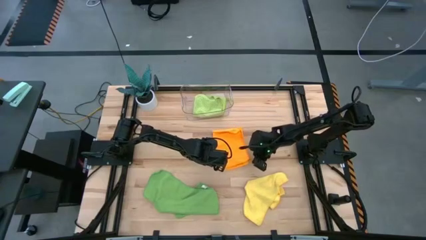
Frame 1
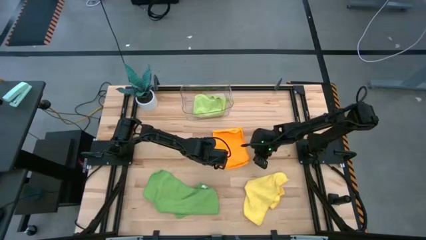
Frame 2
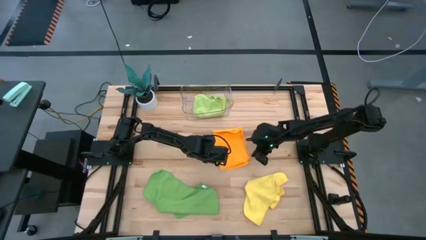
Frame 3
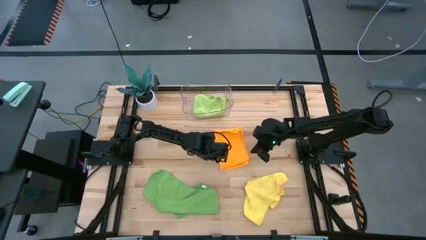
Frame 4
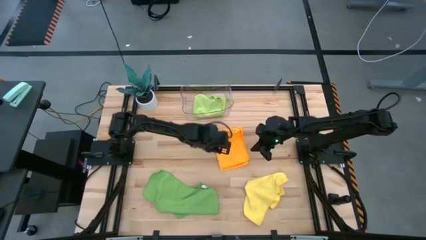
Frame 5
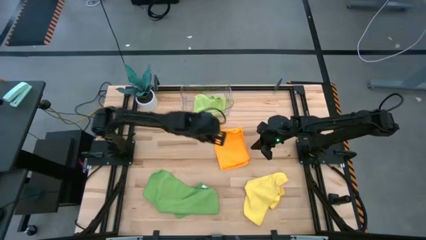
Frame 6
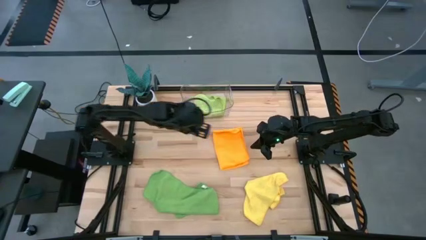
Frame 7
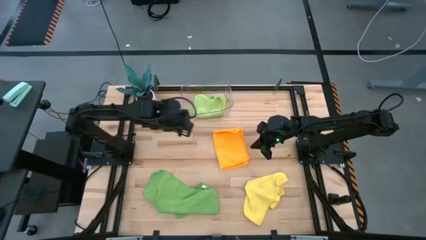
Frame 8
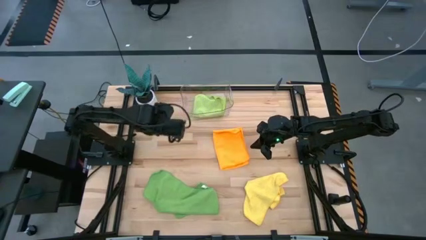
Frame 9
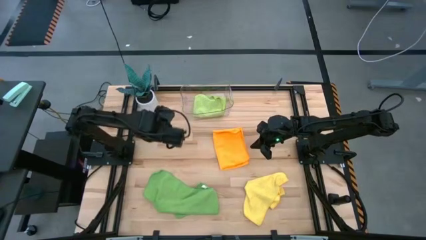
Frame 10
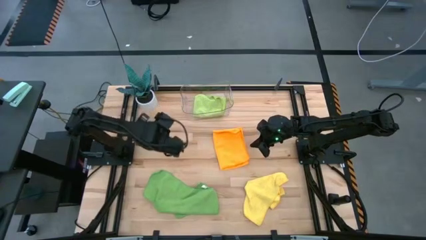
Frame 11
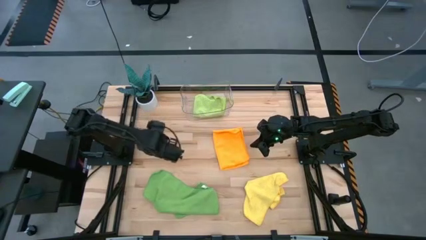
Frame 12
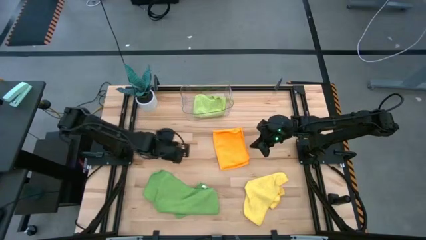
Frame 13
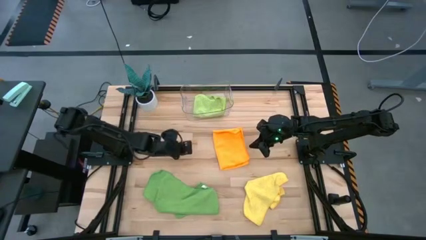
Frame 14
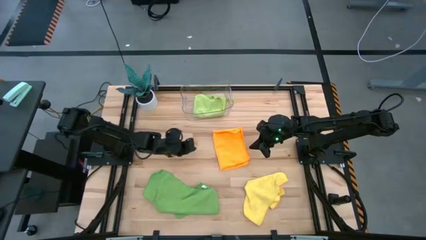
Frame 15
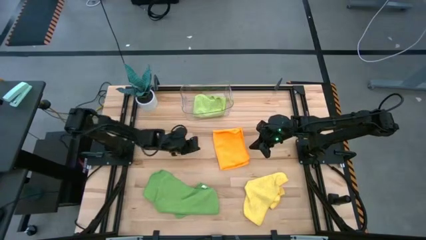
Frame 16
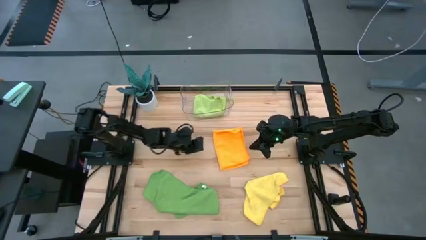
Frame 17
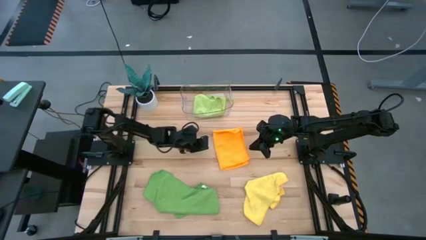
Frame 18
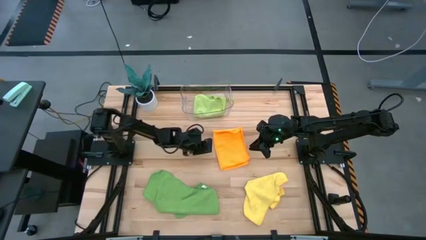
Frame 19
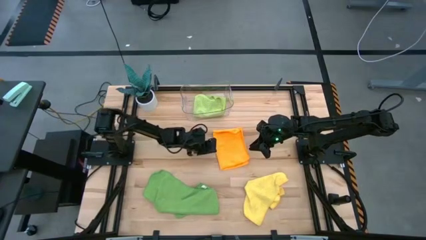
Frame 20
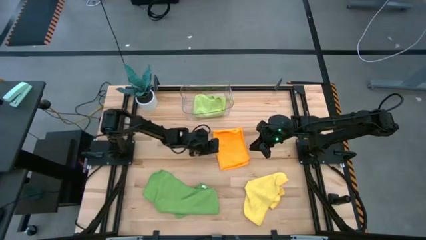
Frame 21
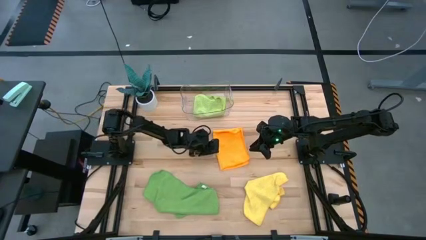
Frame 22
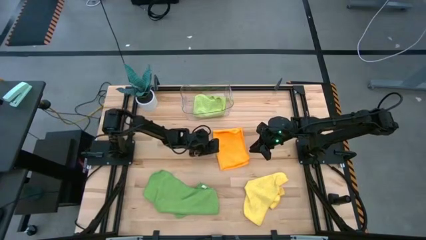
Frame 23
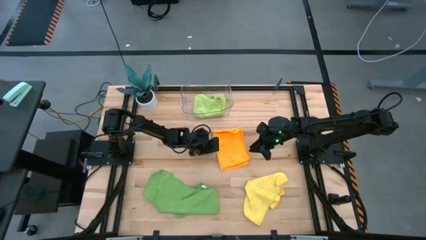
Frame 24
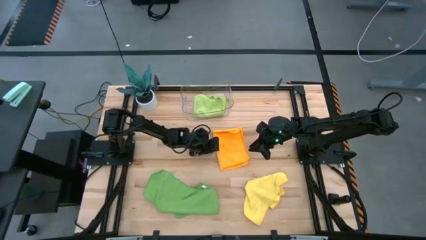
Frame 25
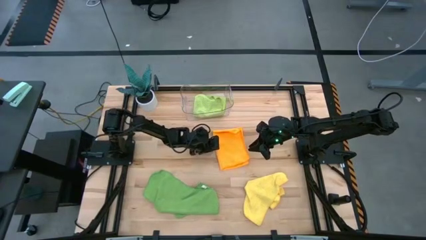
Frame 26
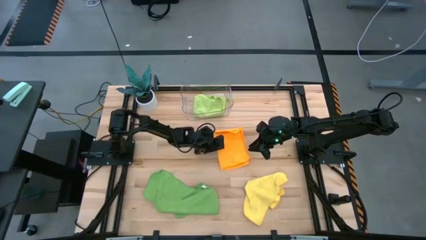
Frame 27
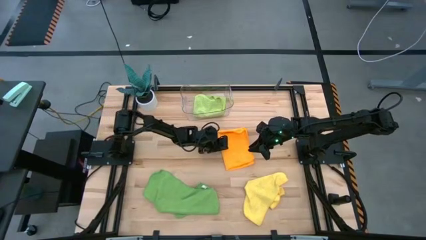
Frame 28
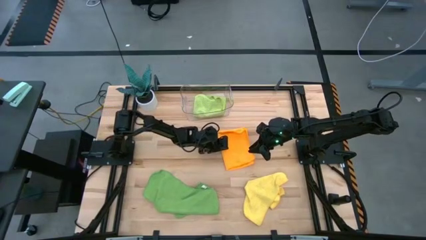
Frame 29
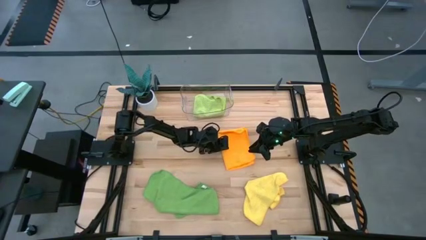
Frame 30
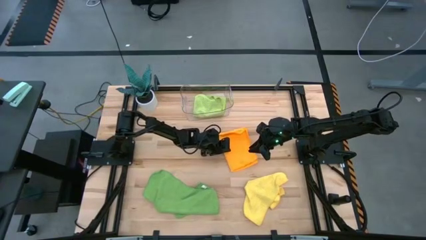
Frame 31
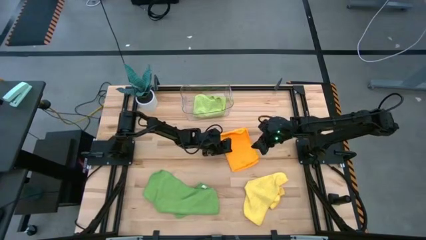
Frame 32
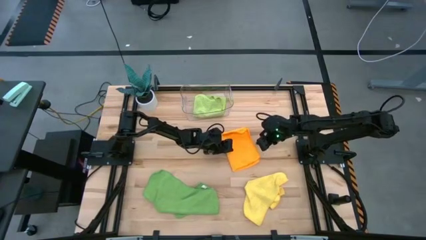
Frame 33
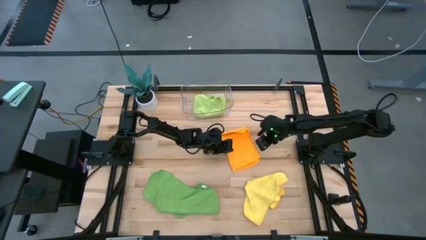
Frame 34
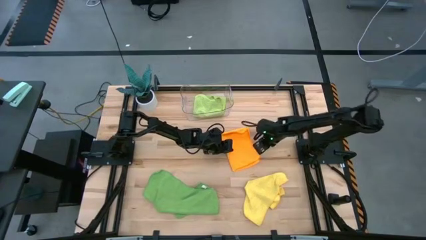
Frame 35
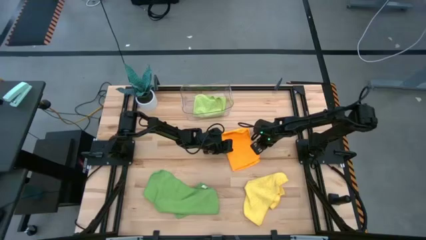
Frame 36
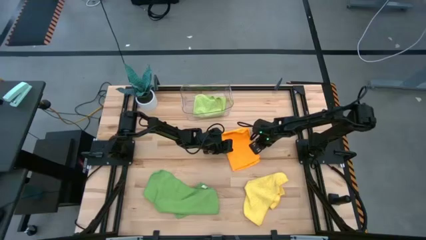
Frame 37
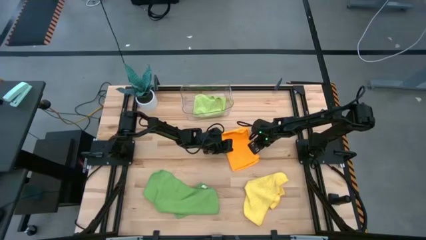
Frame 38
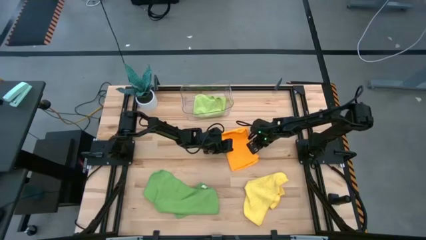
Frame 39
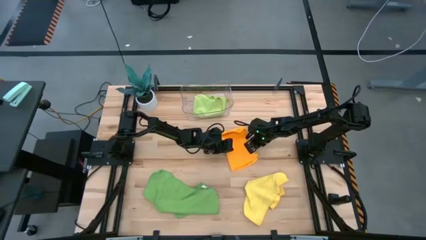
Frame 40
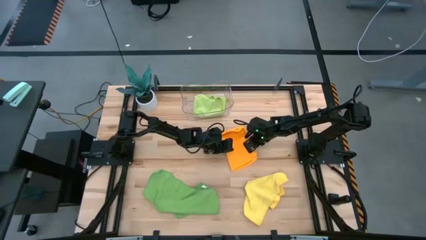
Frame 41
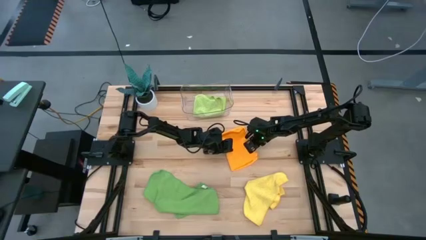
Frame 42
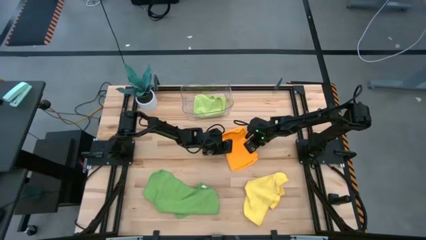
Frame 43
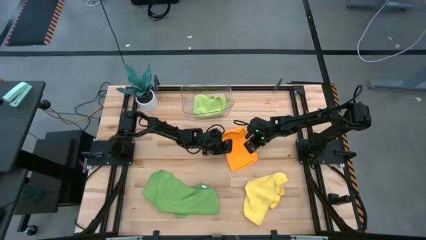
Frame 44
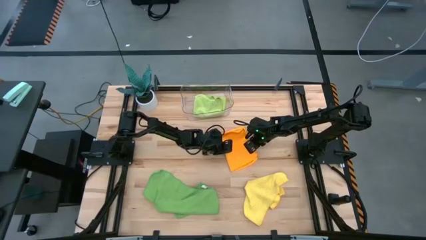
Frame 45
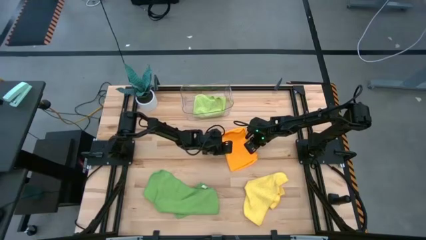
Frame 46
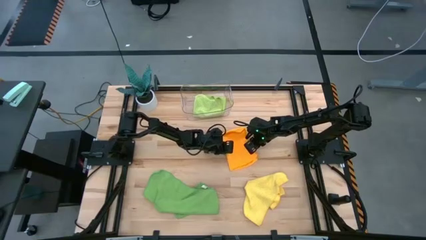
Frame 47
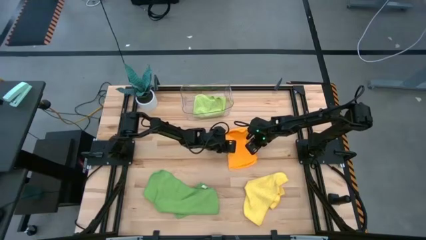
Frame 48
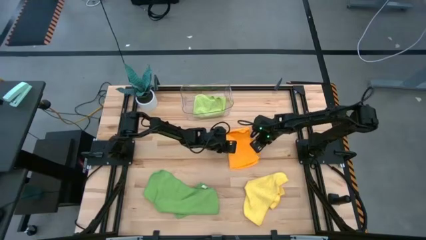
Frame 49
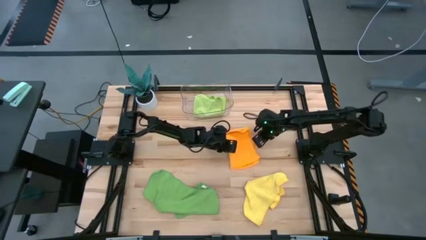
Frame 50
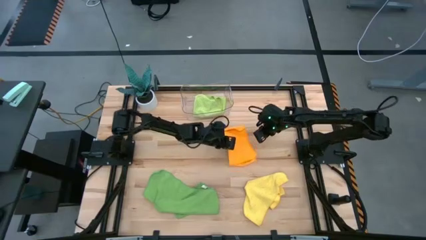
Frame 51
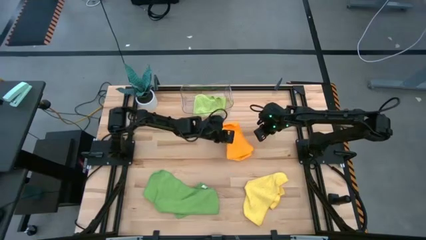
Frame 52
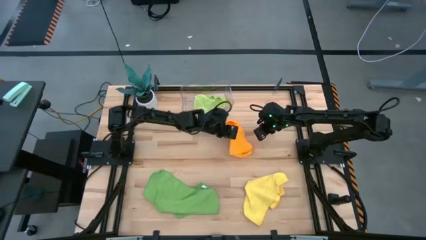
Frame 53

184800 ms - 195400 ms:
Task: Fold microfiber towels
Put the orange microfiber cloth into the transparent bin
